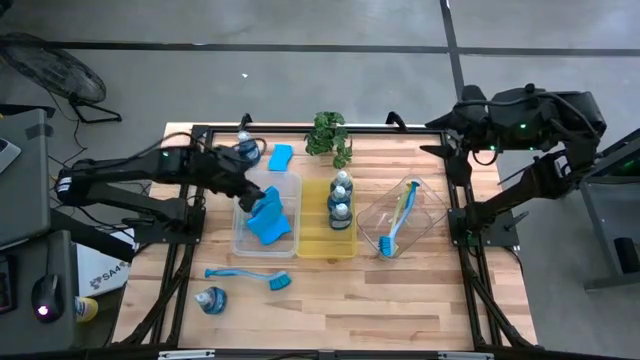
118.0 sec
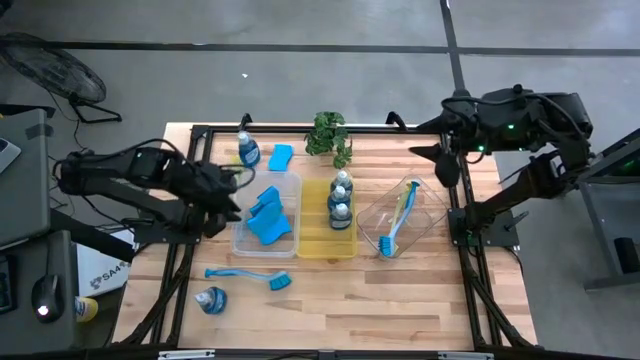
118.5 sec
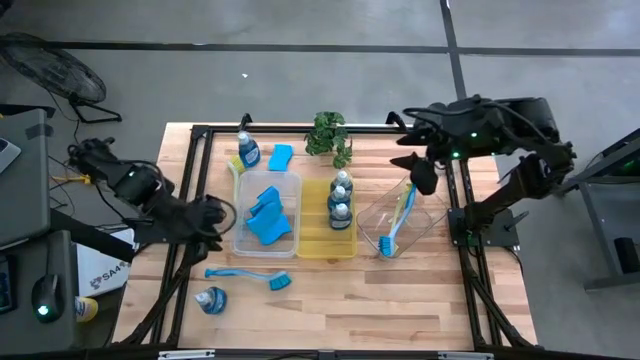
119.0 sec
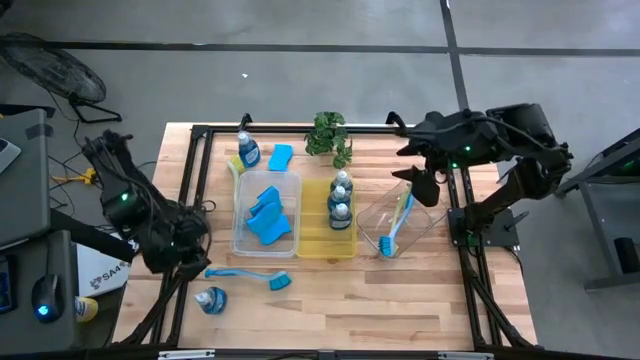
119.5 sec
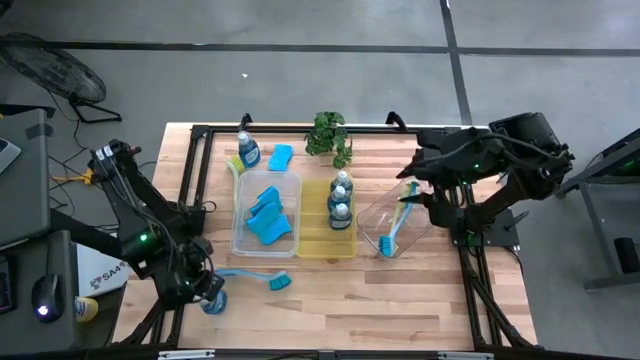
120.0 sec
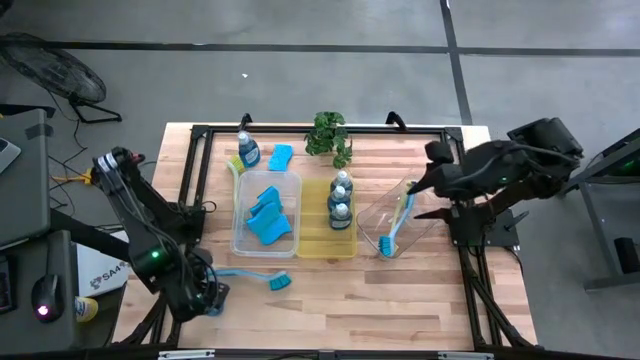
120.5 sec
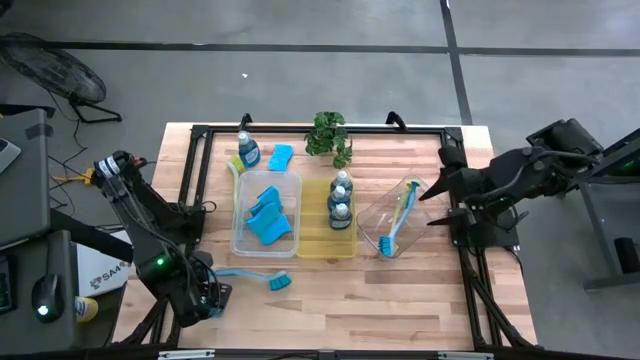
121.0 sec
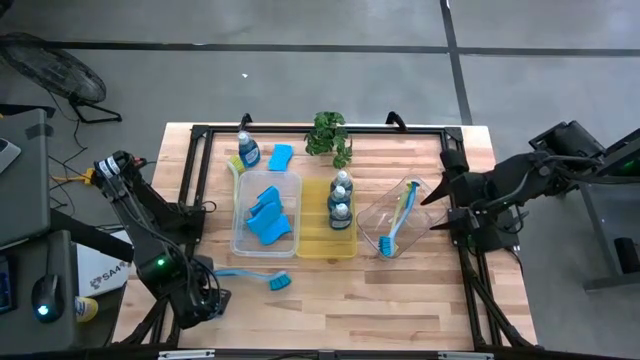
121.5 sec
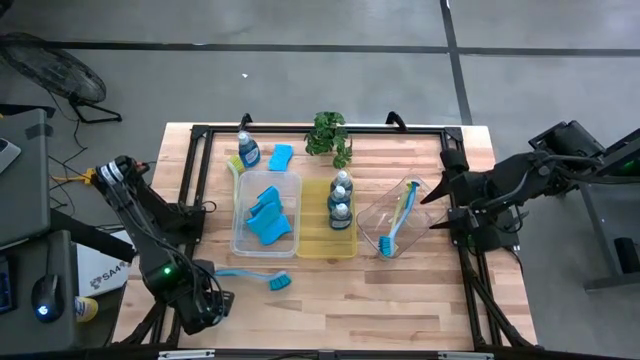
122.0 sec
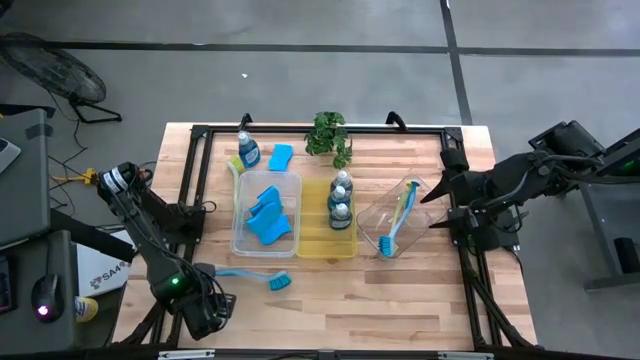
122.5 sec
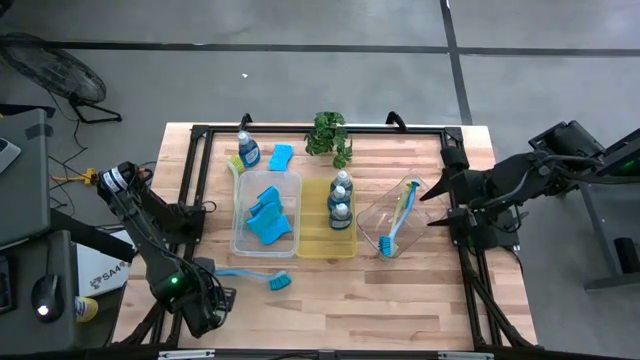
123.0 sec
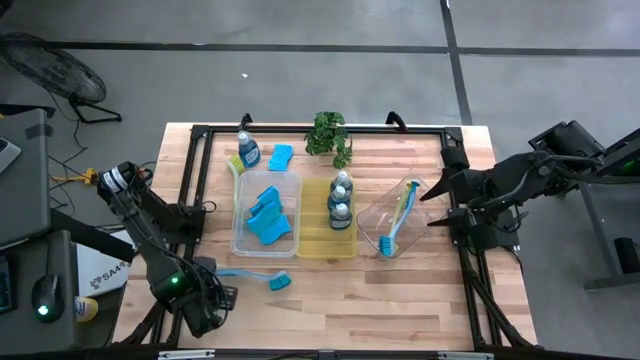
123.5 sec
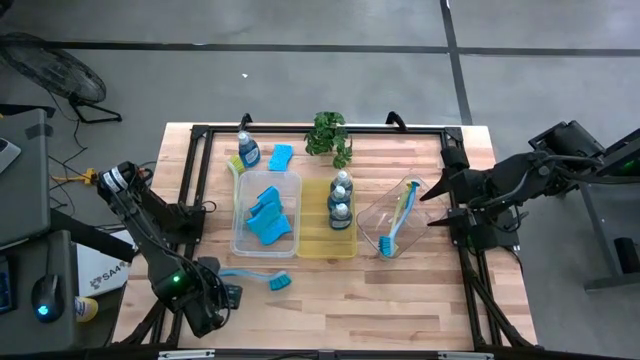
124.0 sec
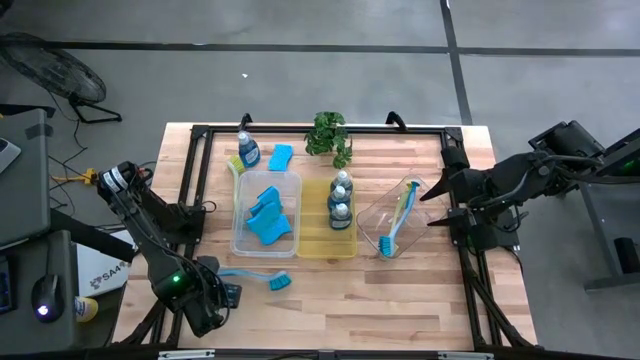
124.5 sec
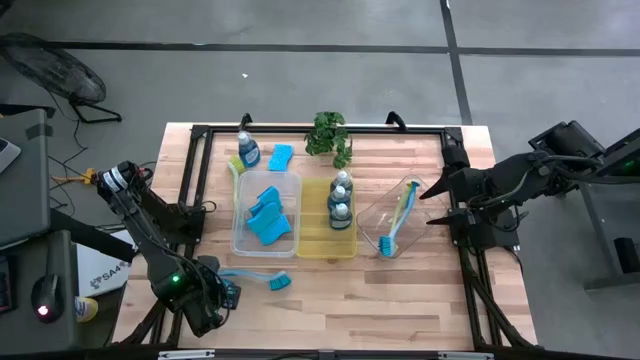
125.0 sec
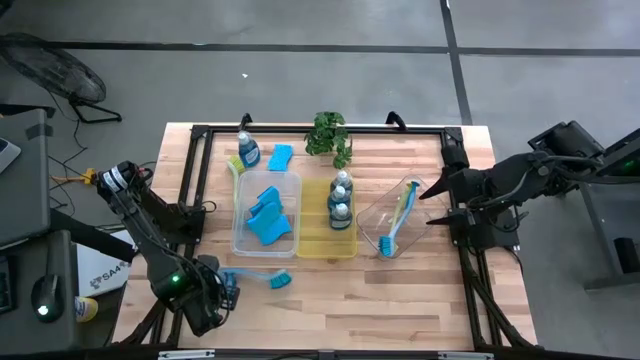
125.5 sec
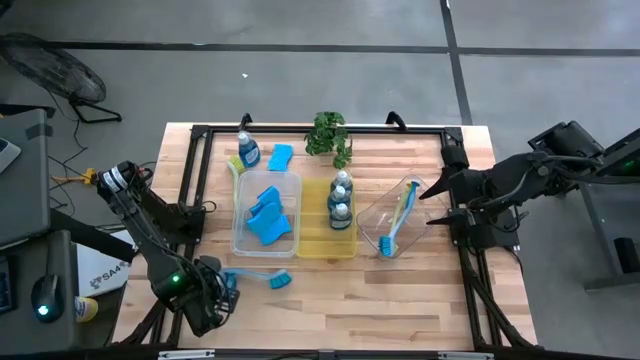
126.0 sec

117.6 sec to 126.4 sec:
Task: Pick & Place Kitchen Sink Supplies
Put the dishwashing liquid bottle into the yellow bin

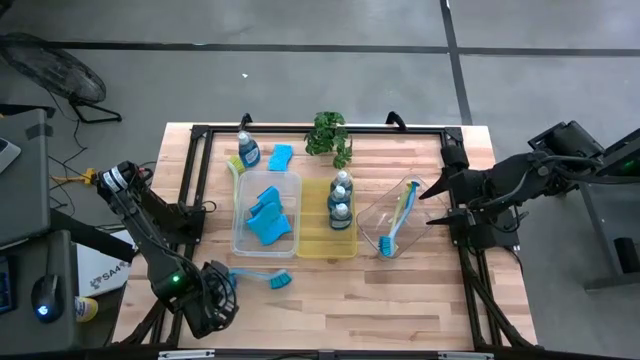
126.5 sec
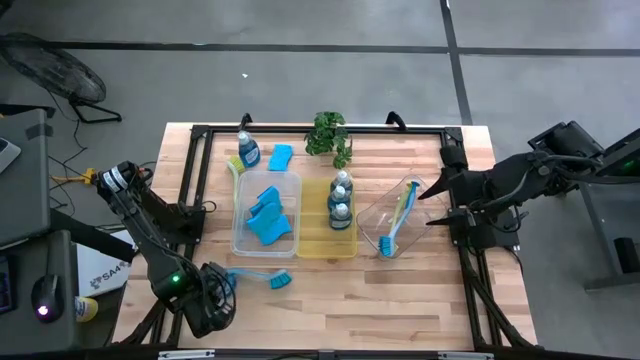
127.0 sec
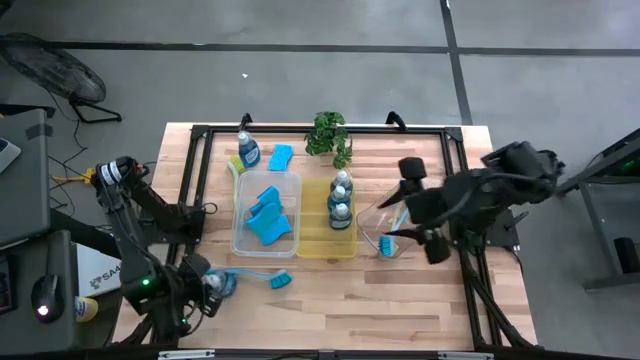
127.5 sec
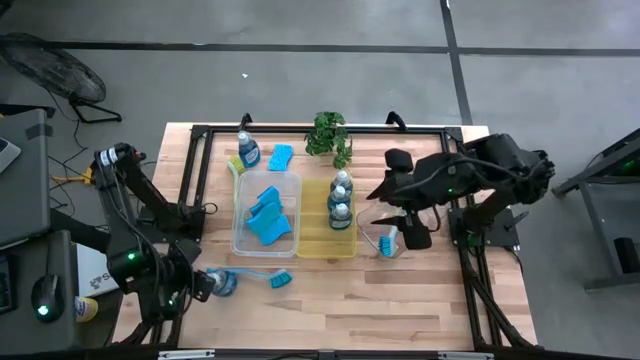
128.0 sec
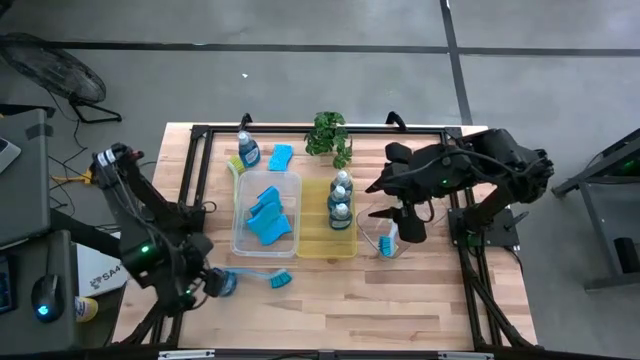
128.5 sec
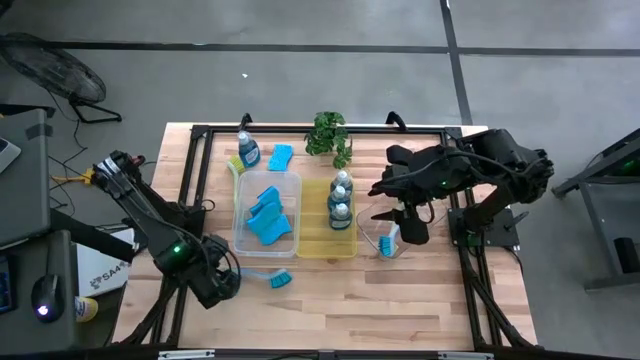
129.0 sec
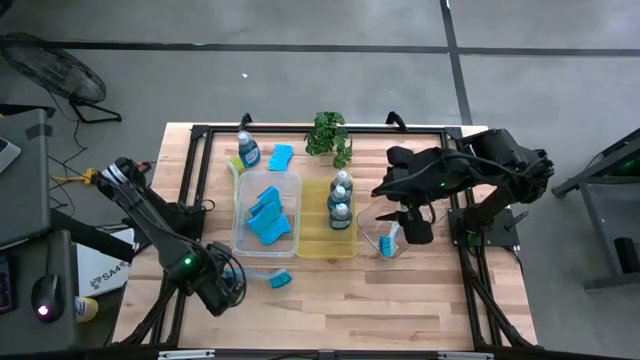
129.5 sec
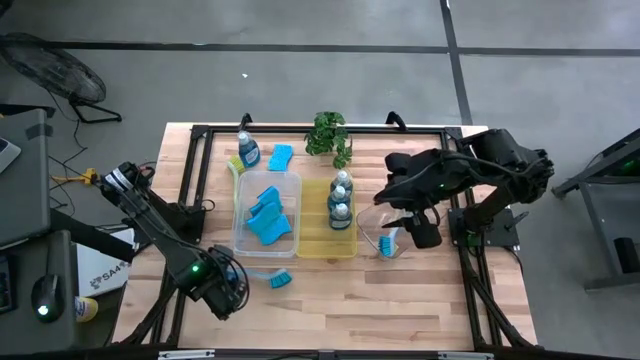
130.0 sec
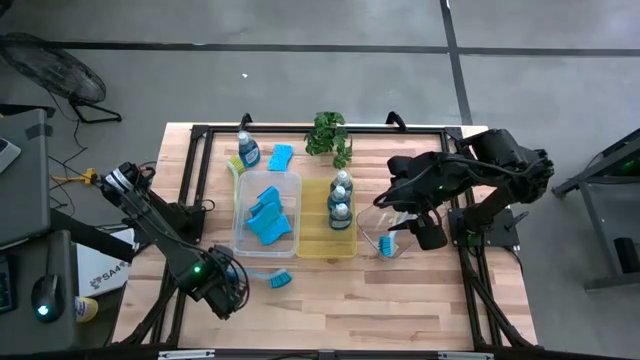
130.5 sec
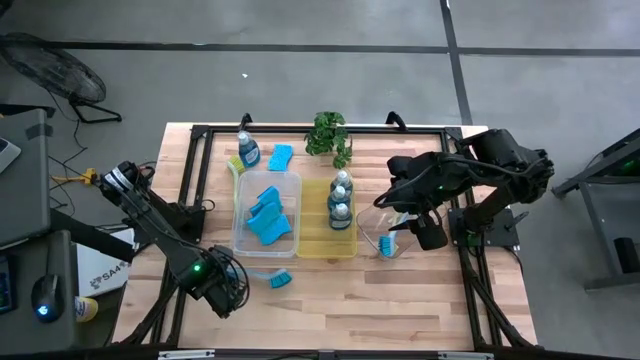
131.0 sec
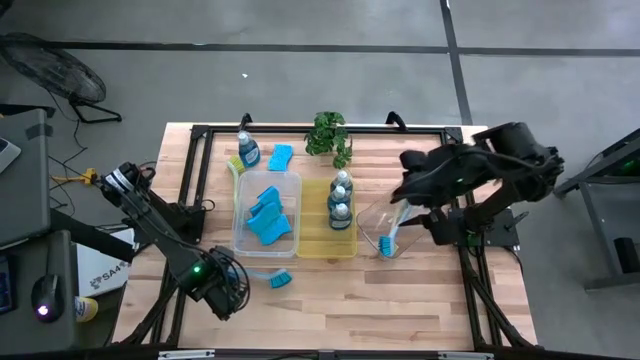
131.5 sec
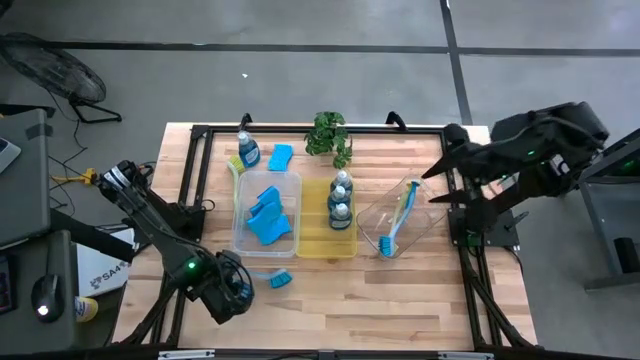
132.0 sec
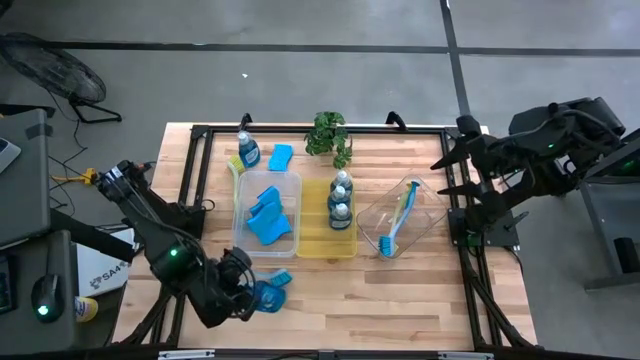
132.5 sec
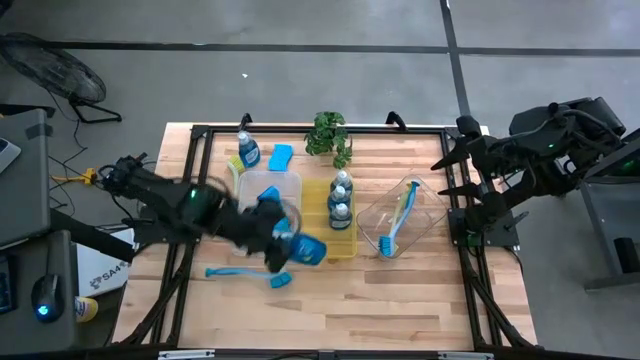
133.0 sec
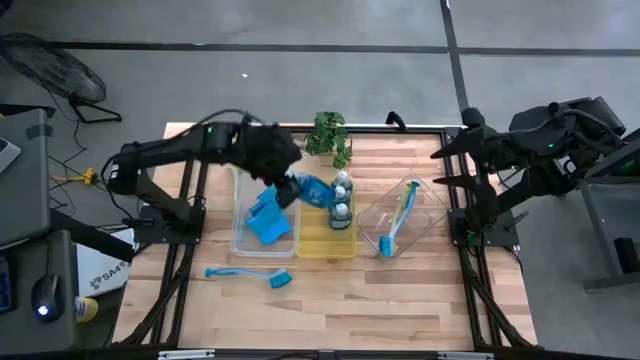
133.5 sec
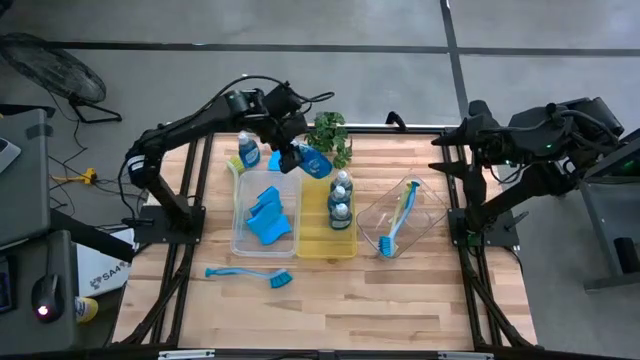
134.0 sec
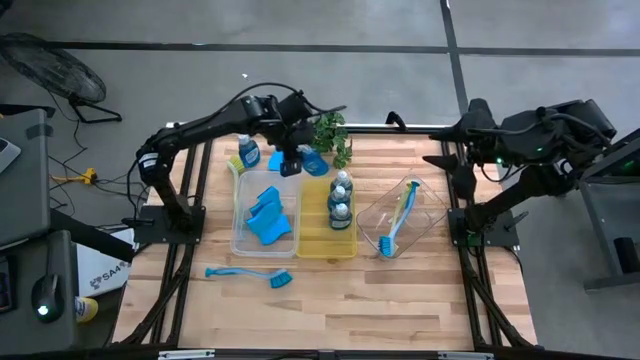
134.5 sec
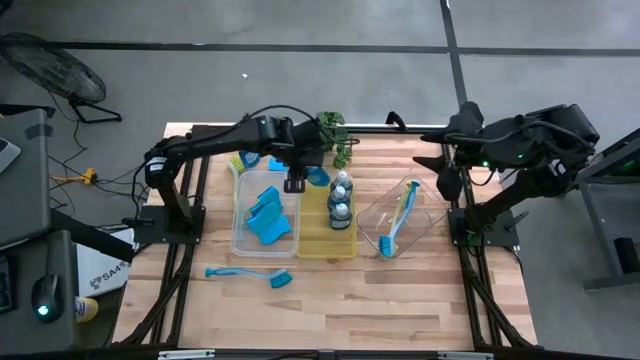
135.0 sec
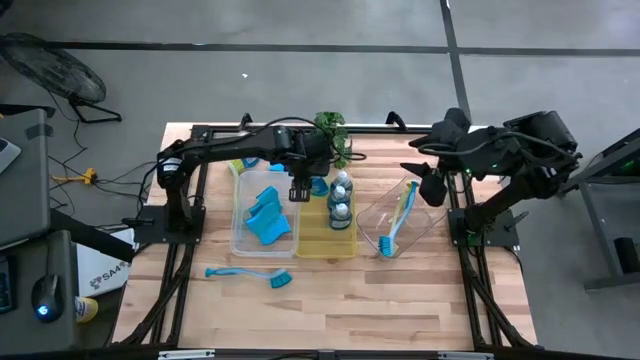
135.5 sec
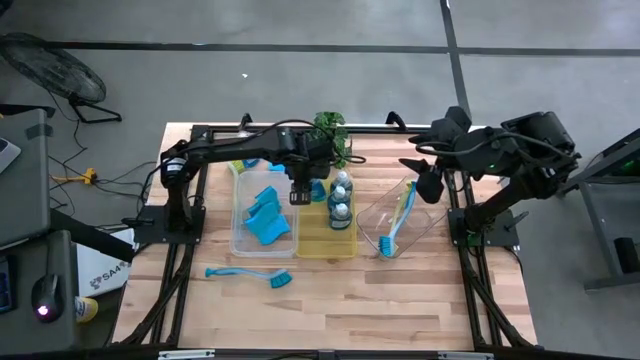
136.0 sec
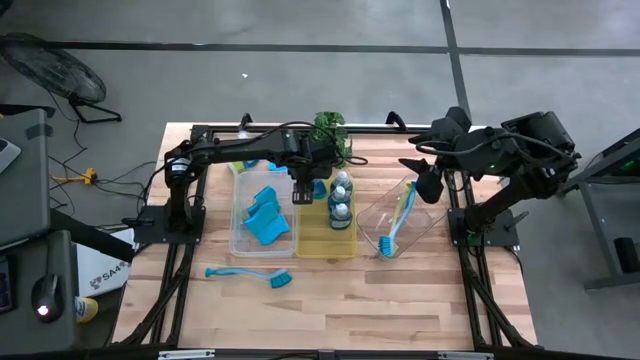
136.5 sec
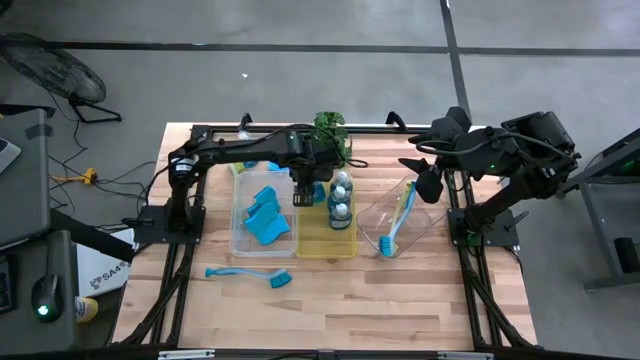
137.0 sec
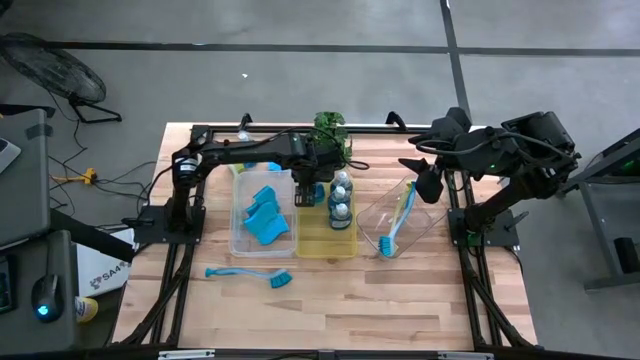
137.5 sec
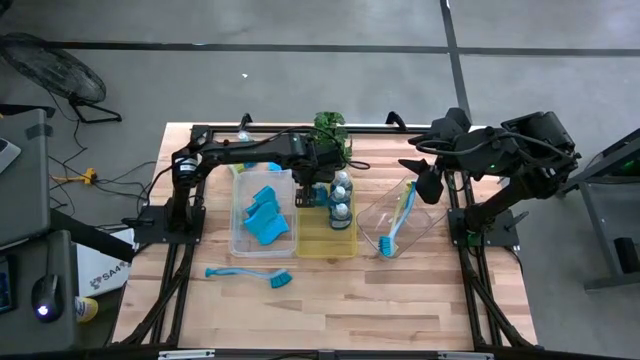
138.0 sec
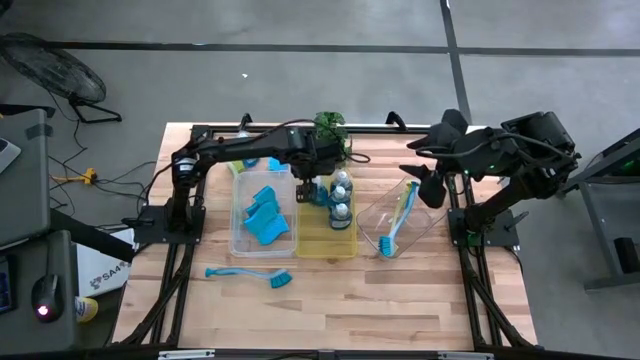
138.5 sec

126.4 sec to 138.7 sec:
Put the dishwashing liquid bottle into the yellow bin
